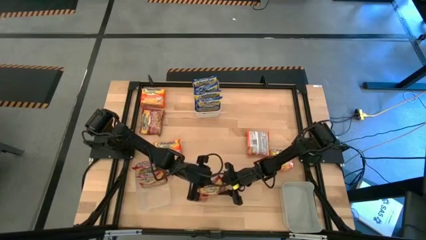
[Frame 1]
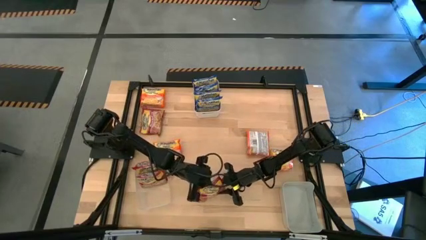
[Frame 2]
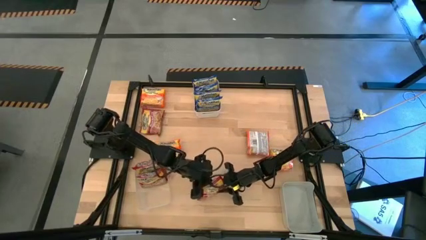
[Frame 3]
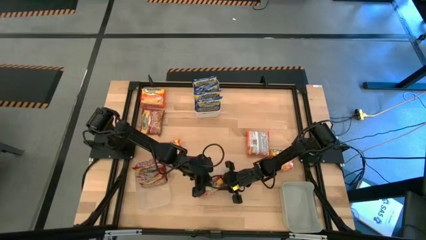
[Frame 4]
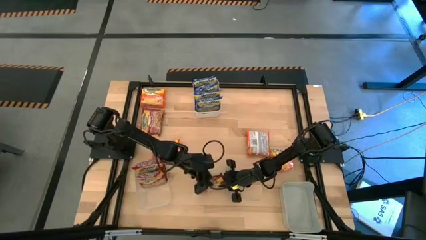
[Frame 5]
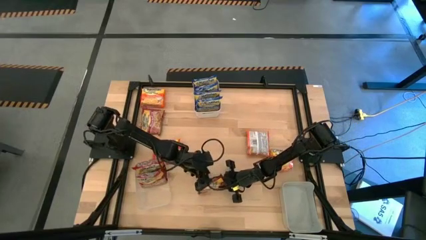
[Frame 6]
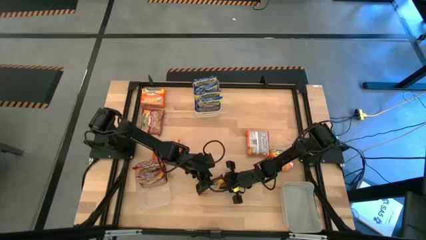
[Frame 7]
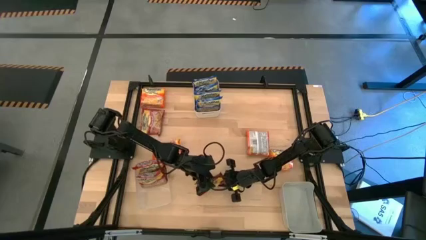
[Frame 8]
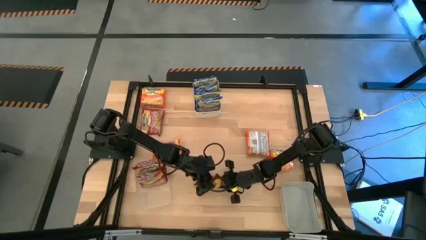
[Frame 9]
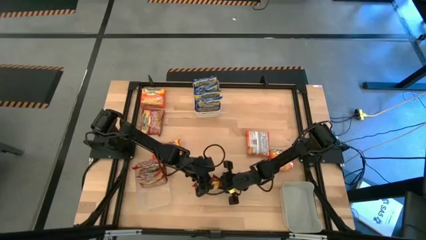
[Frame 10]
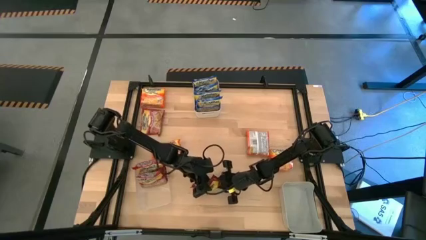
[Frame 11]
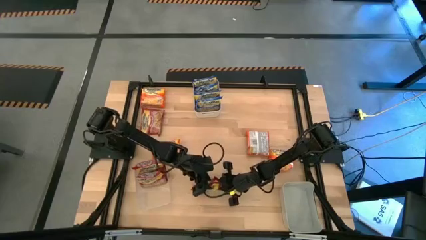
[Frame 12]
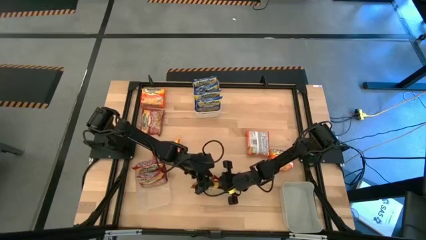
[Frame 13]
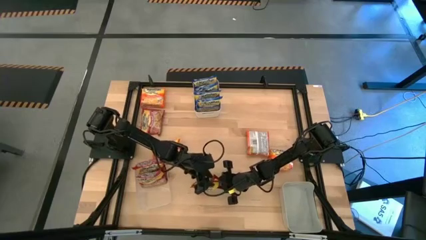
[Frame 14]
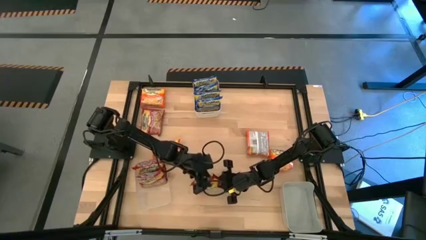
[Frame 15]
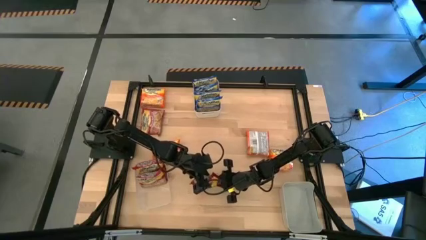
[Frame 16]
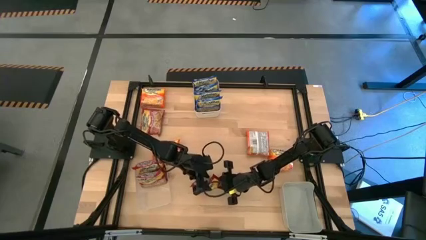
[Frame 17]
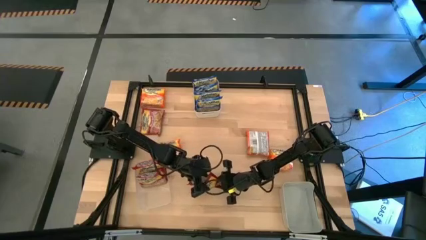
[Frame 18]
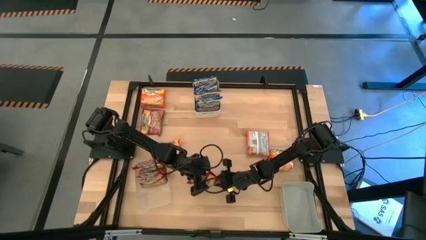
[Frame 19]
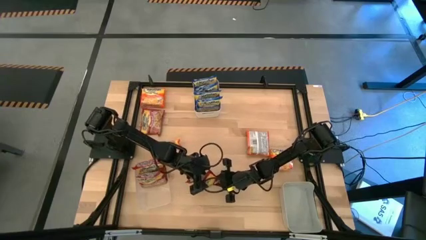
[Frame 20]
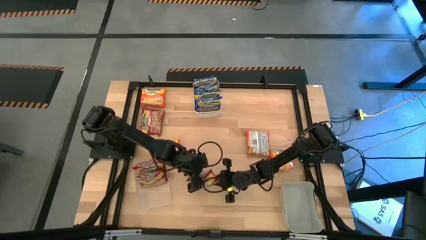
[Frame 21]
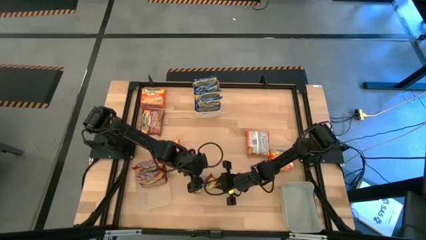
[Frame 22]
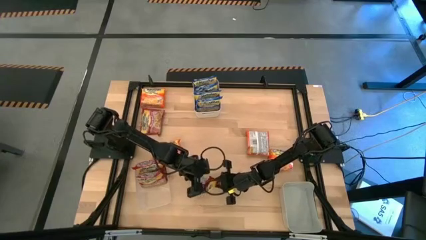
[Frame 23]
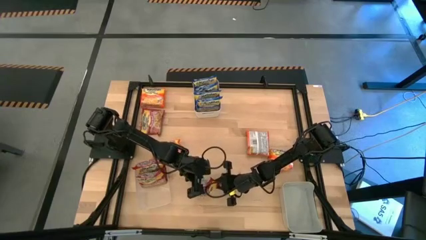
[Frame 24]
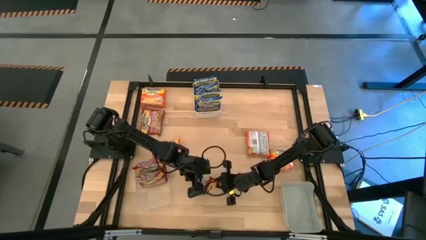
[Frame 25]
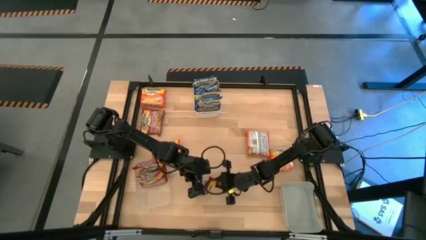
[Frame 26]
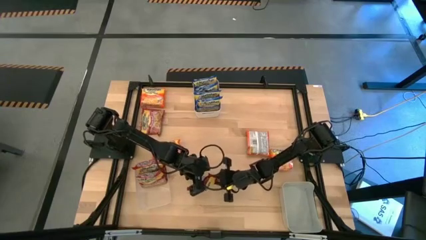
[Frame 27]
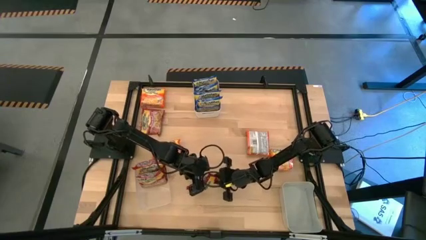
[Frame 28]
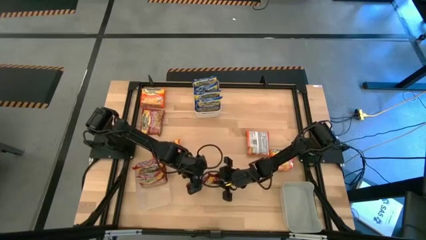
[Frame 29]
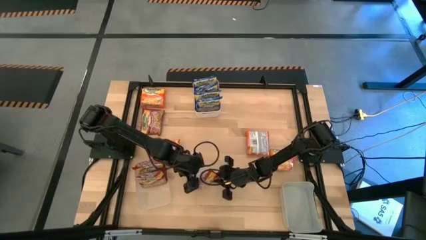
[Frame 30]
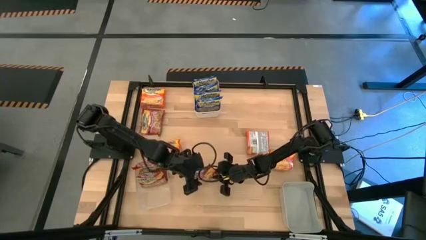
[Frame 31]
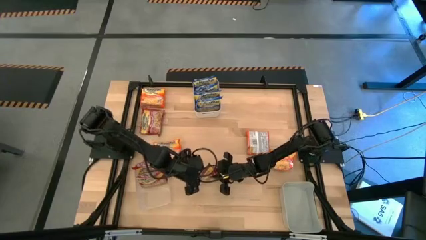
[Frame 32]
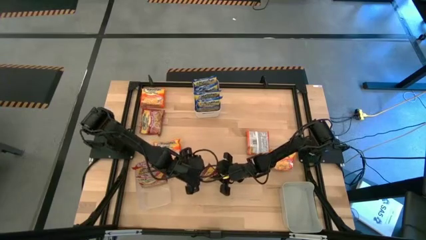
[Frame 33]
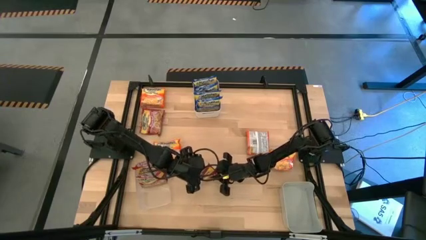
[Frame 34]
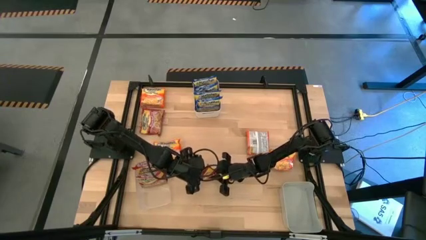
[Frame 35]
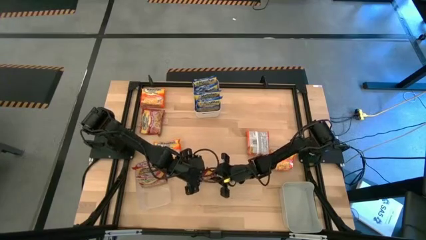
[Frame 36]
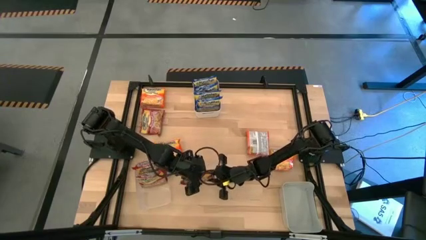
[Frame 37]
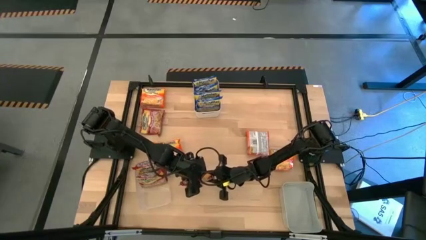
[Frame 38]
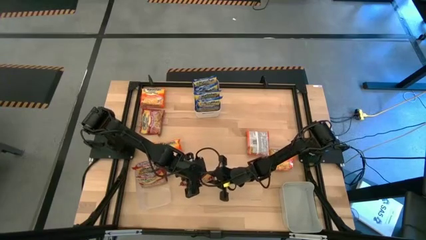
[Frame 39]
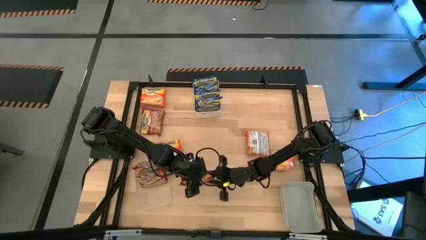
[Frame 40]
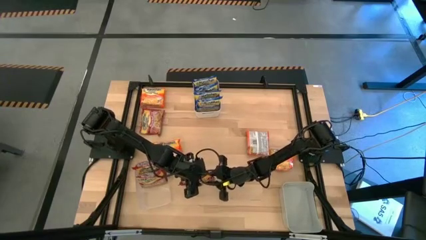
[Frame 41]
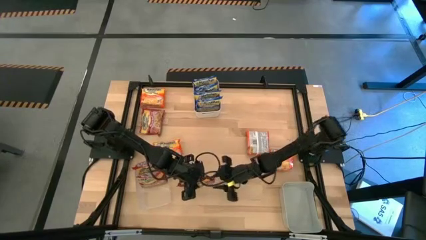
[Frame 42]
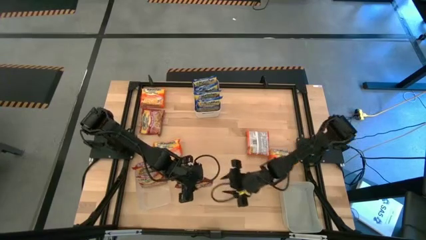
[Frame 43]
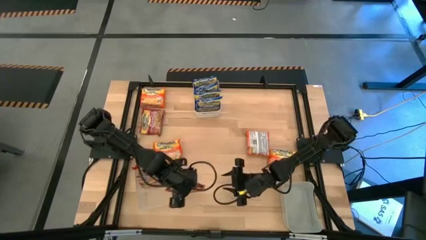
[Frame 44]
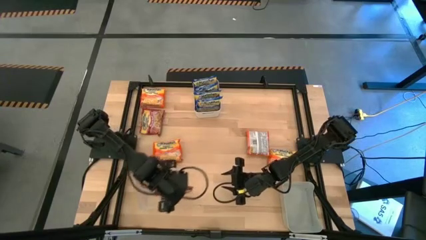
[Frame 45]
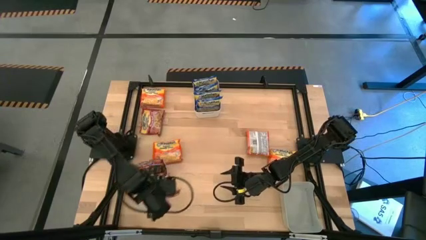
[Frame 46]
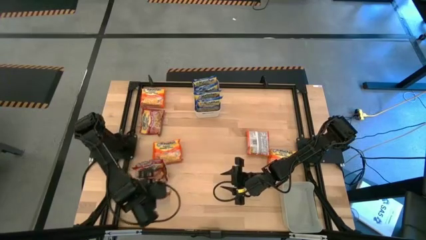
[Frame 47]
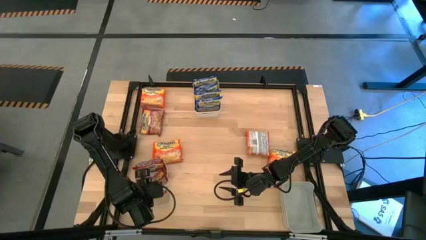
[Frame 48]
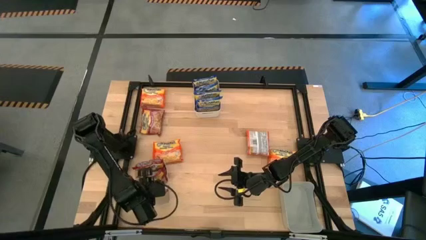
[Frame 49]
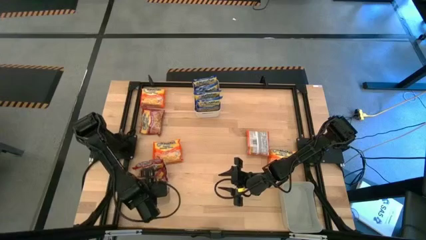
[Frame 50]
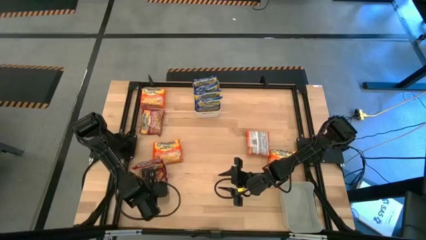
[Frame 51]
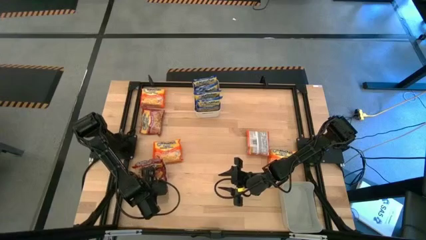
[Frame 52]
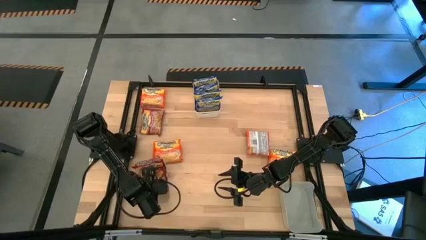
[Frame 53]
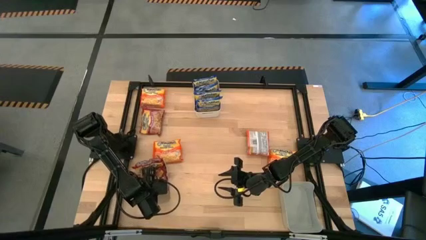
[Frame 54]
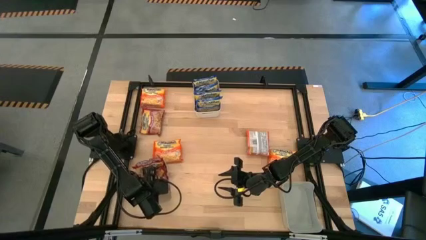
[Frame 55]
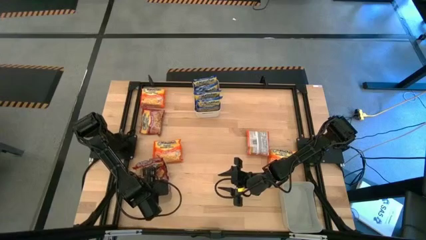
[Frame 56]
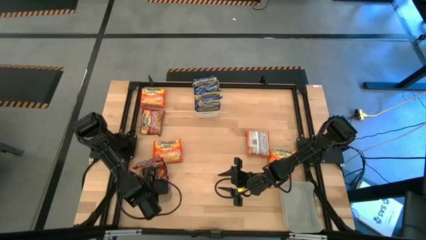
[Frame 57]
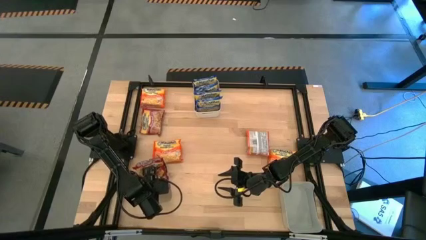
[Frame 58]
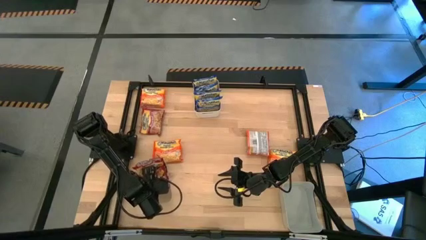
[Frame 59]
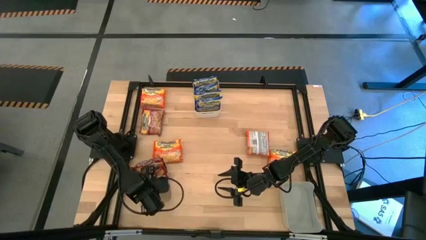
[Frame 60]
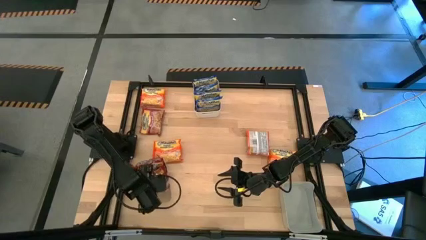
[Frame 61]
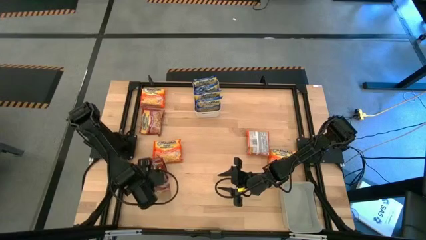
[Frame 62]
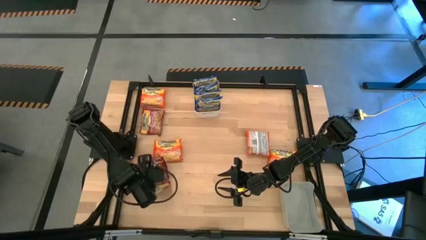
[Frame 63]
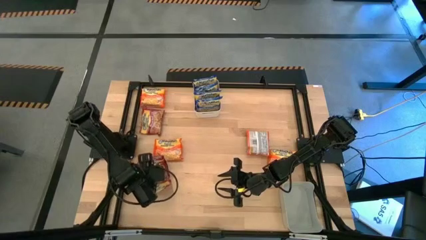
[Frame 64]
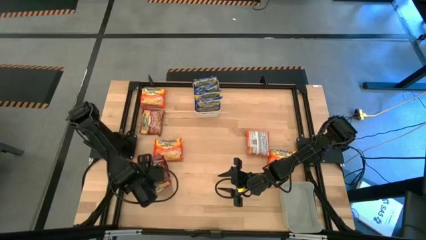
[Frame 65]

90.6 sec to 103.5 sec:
Task: Sort Maruchan noodles
Put the red noodle pack into the transparent bin

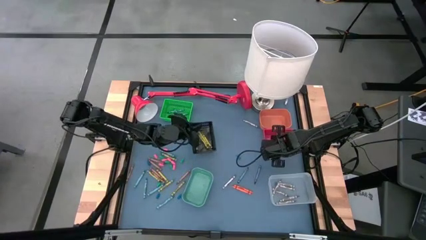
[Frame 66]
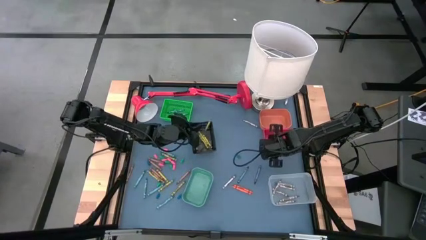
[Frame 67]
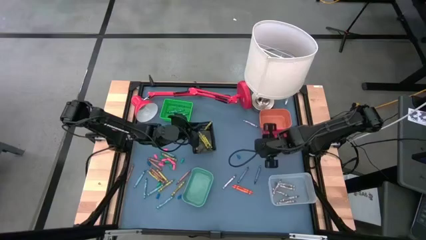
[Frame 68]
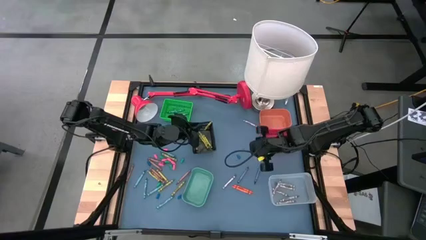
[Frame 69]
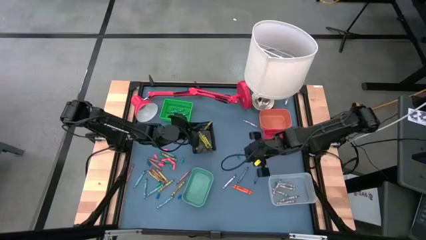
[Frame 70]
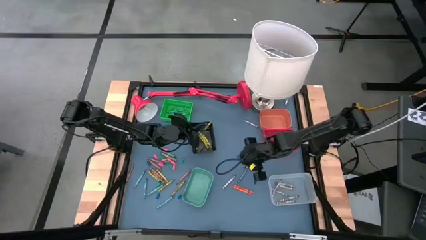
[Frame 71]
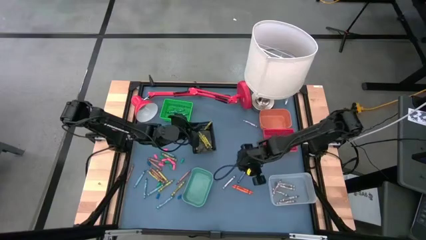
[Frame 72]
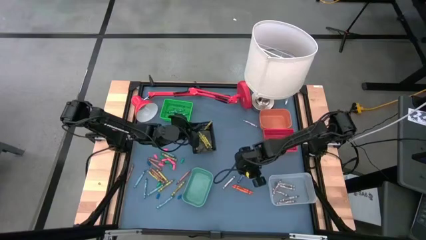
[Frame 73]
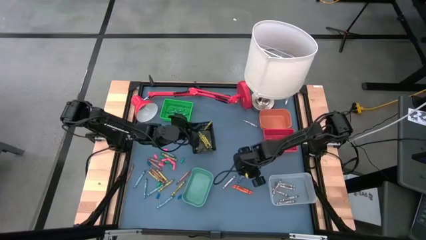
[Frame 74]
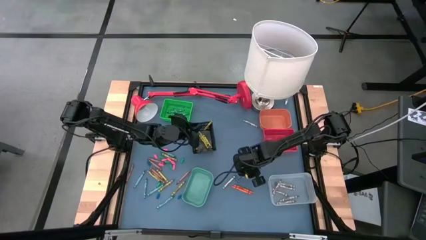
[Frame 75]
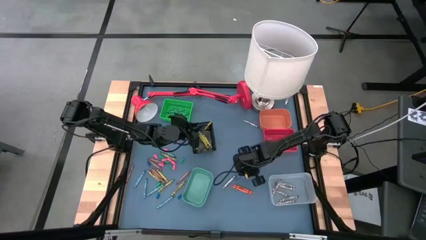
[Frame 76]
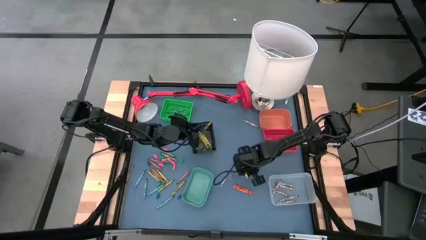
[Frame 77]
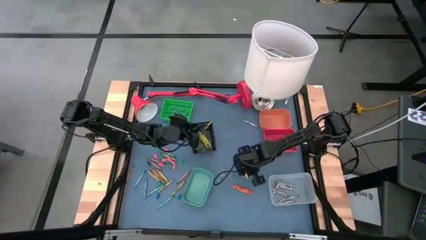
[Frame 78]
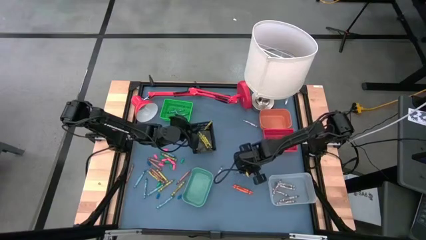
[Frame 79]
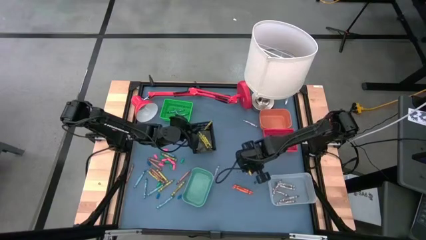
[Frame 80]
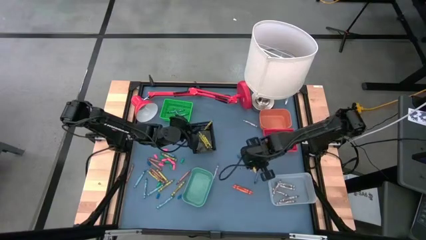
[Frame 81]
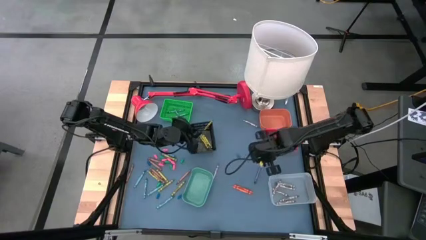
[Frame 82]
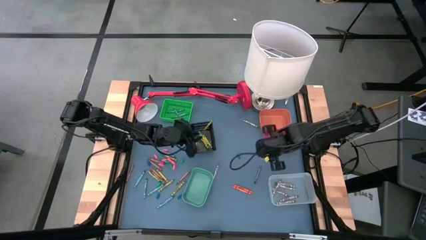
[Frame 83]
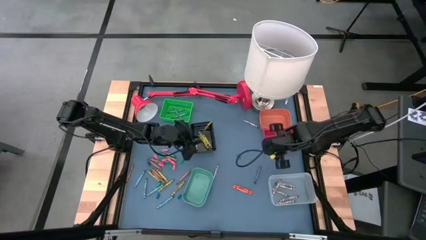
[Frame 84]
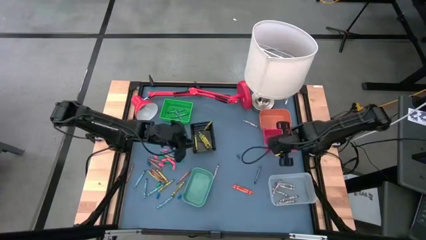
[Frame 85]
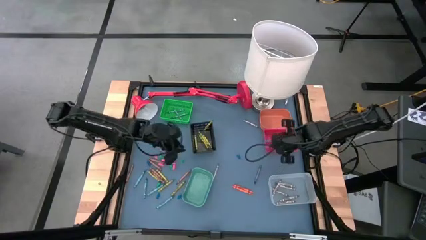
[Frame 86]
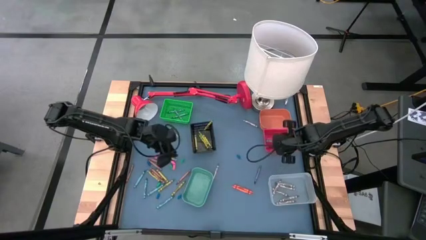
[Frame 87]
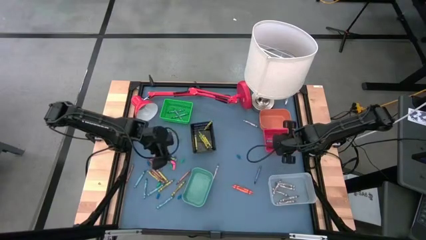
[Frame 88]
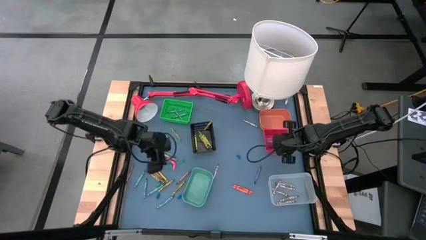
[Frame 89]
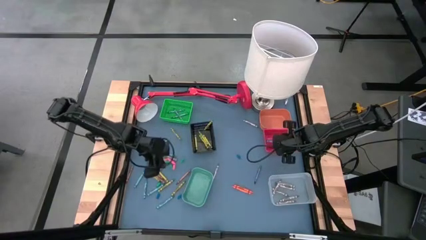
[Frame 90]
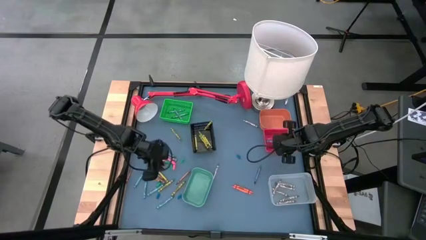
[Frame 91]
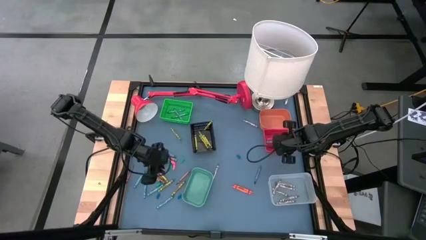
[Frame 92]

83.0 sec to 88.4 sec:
Task: Sort crayons
Put the dark blue crayon into the red bin
